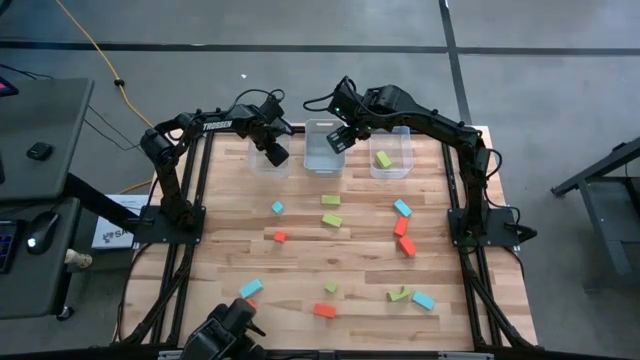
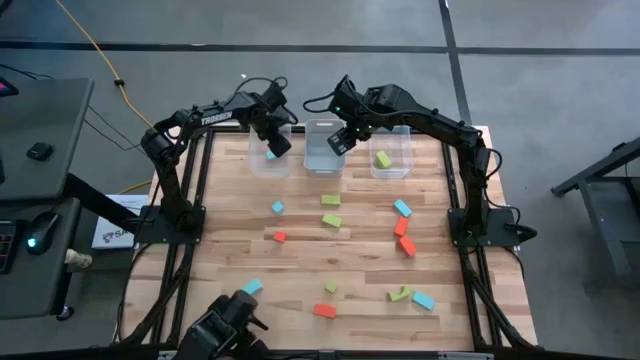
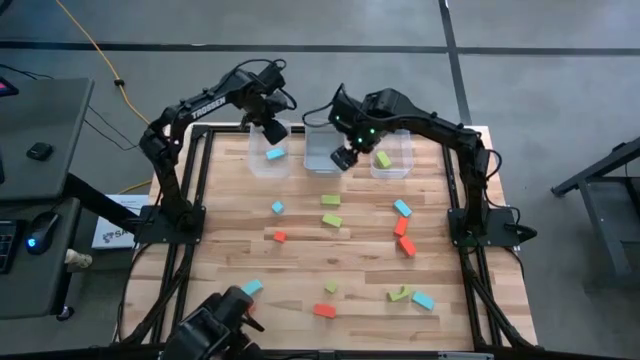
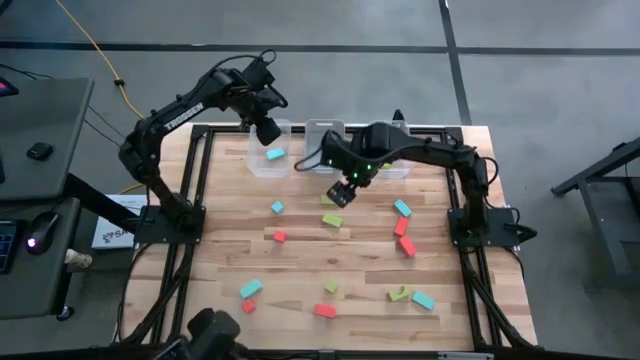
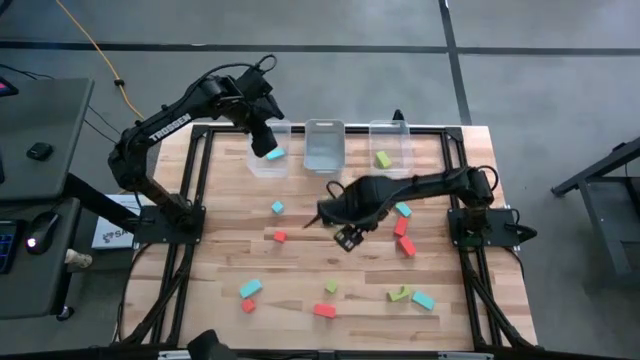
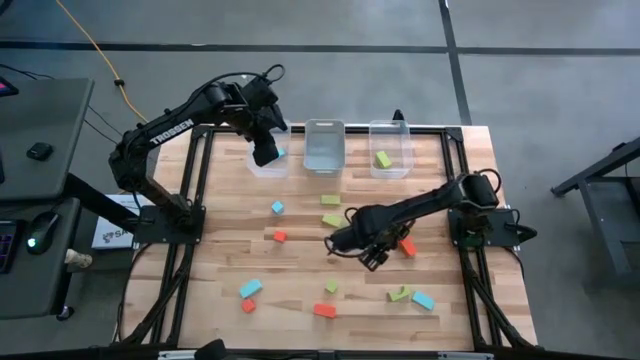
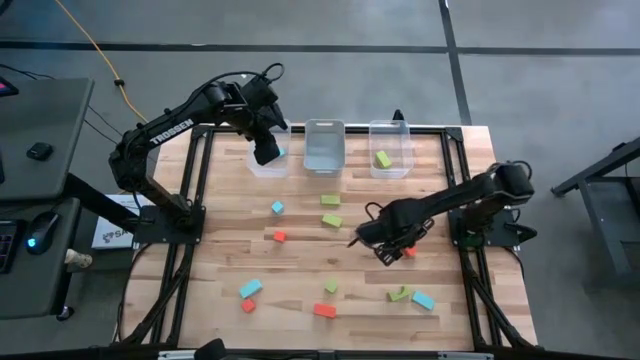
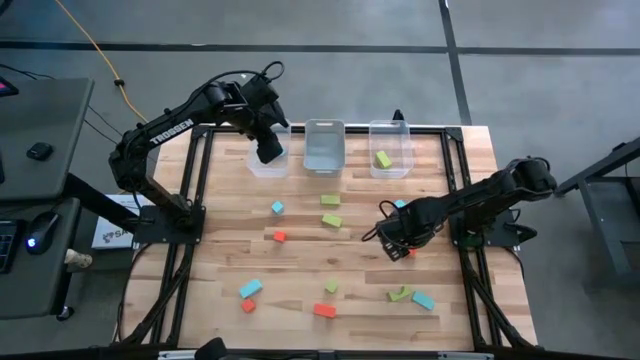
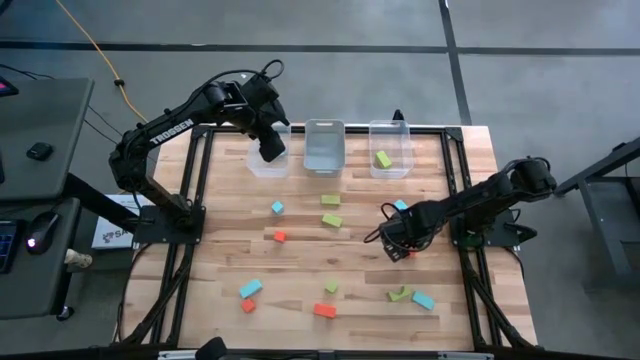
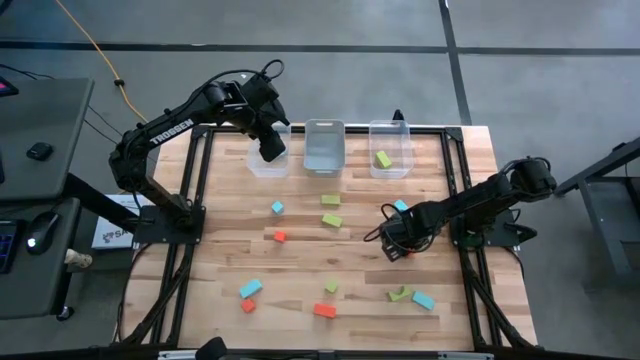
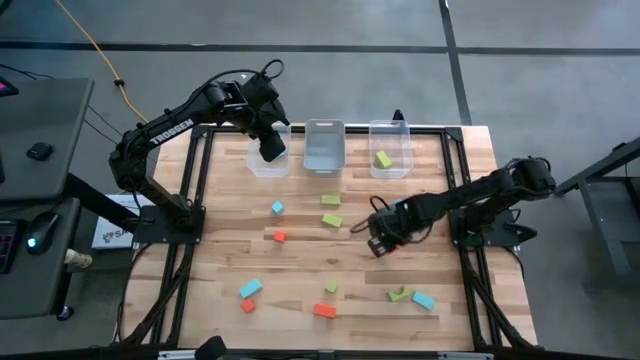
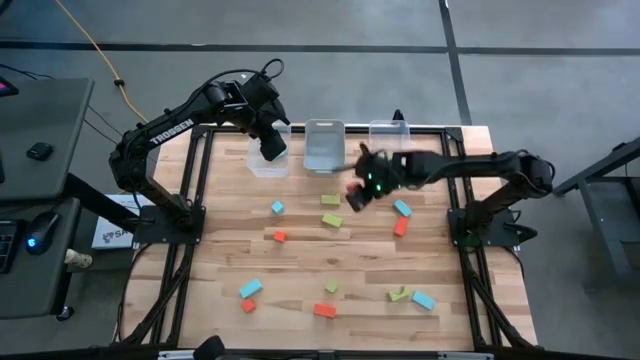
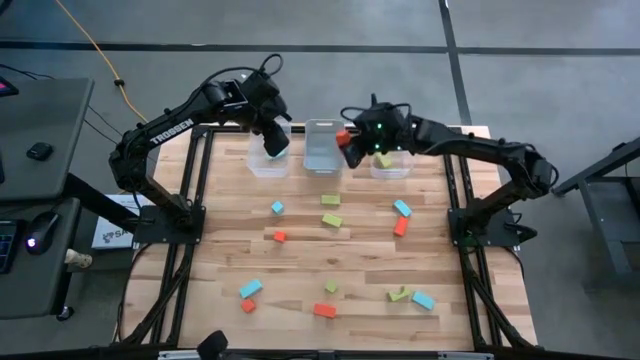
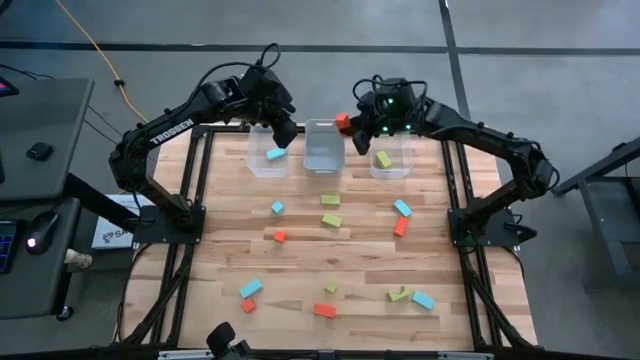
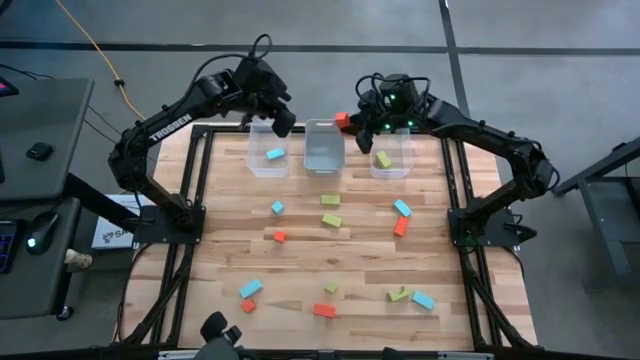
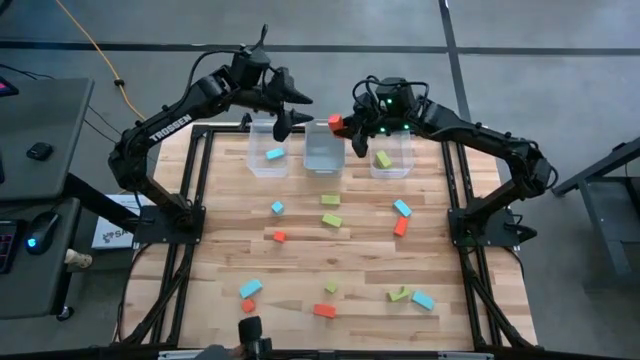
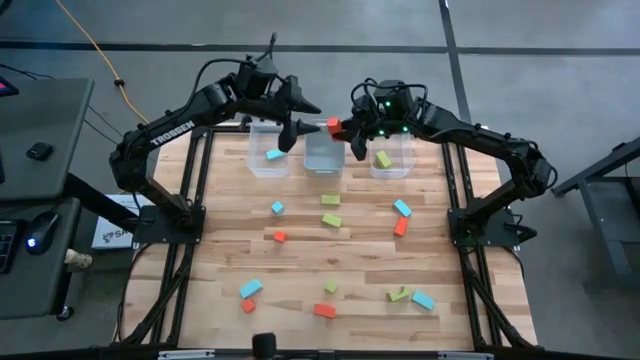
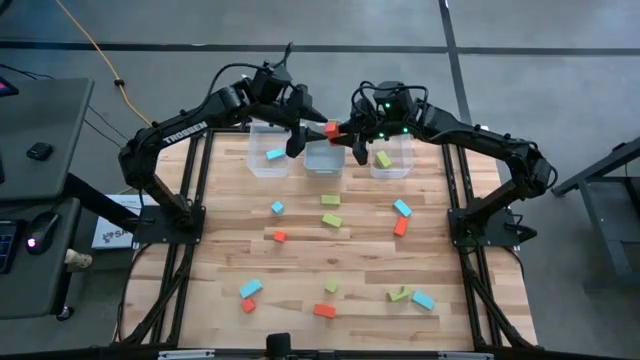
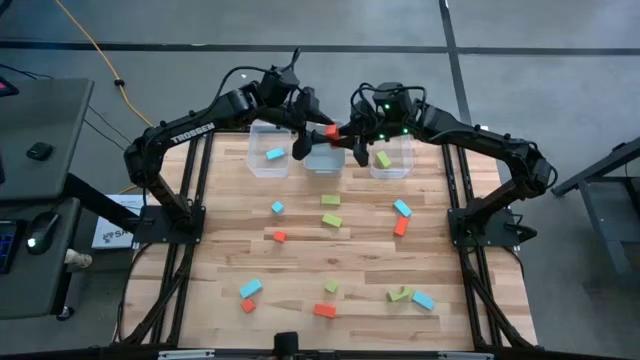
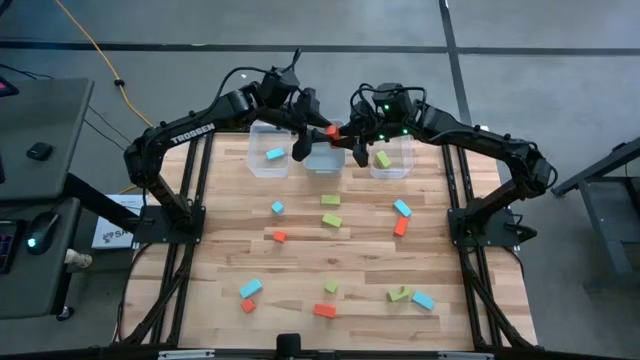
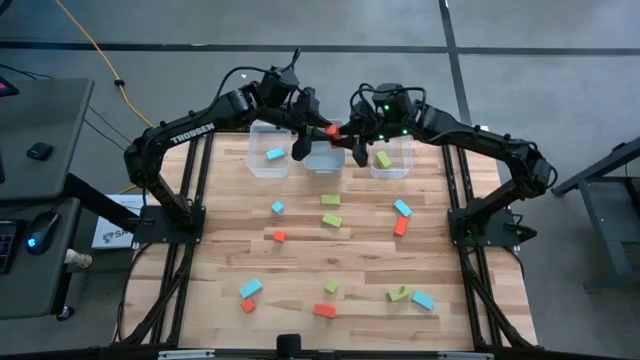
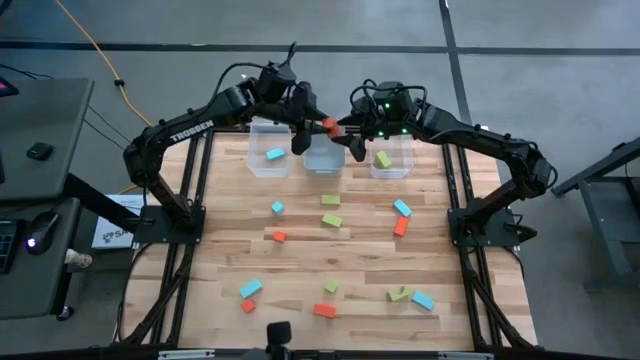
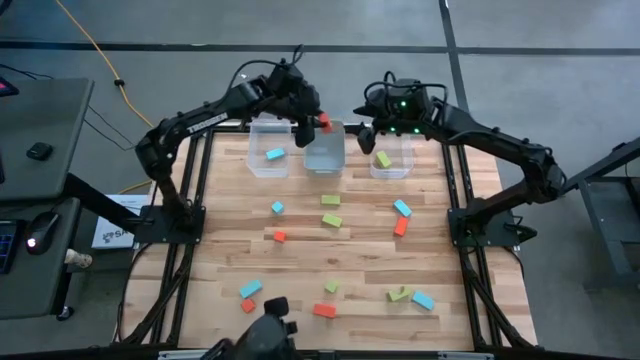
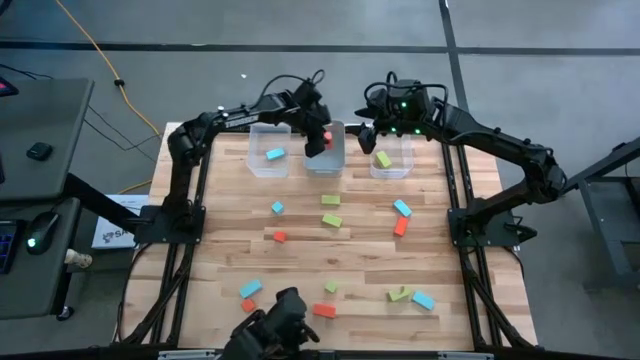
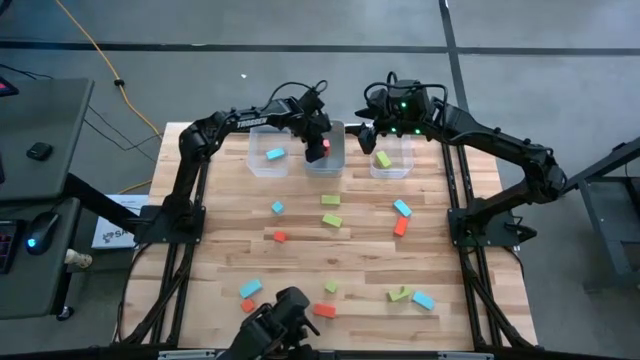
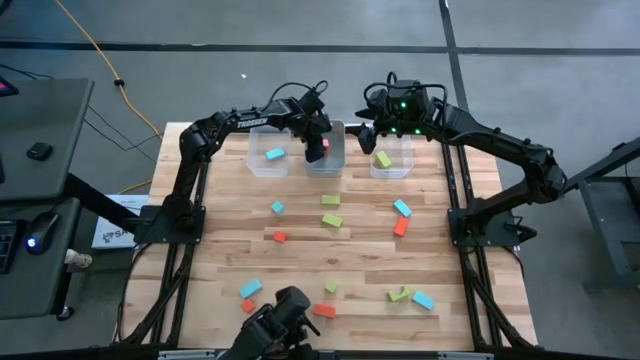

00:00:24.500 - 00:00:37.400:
Task: Sort & place blocks by color
Put the large orange rectangular block into the gray bin

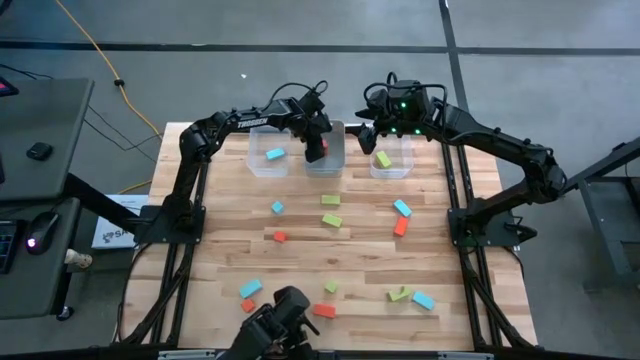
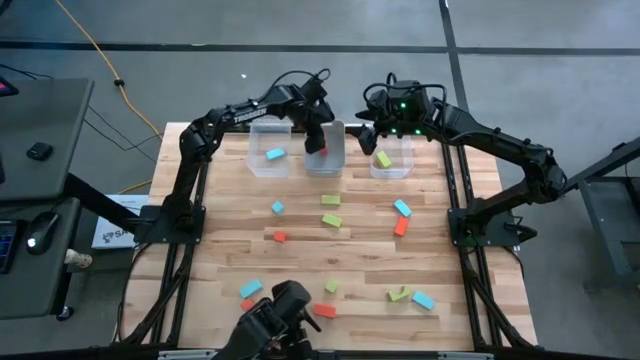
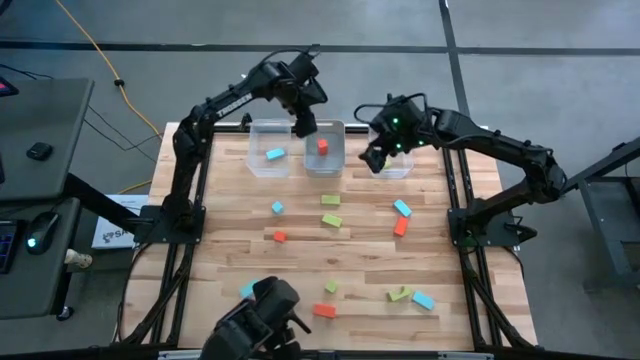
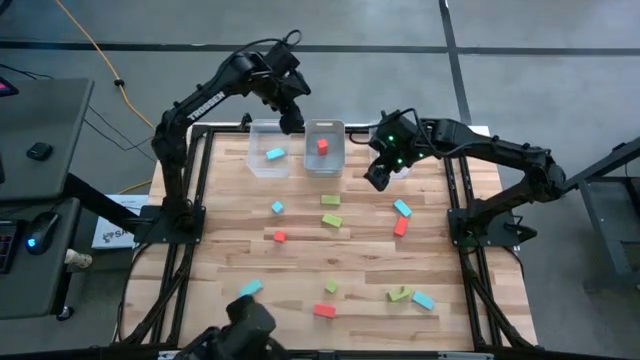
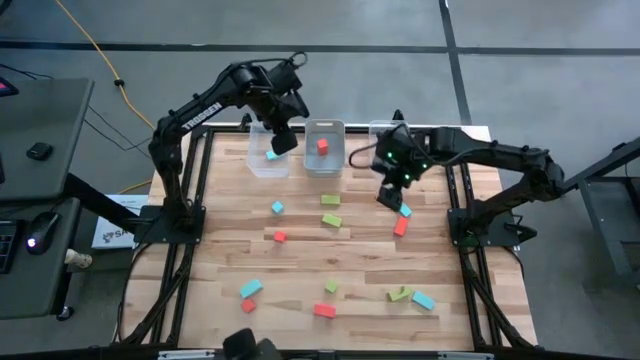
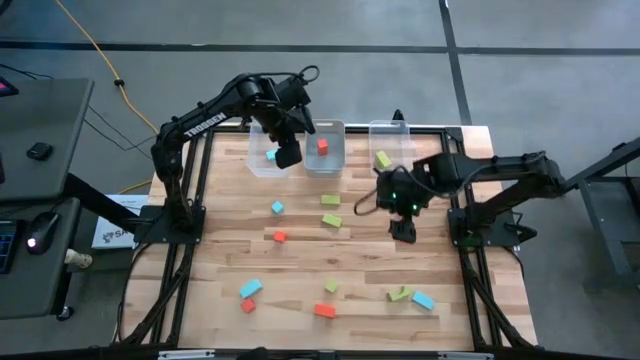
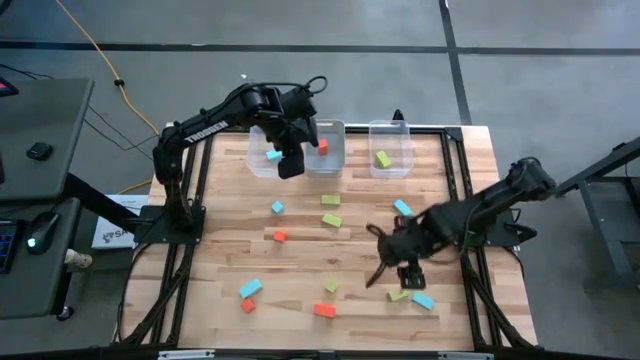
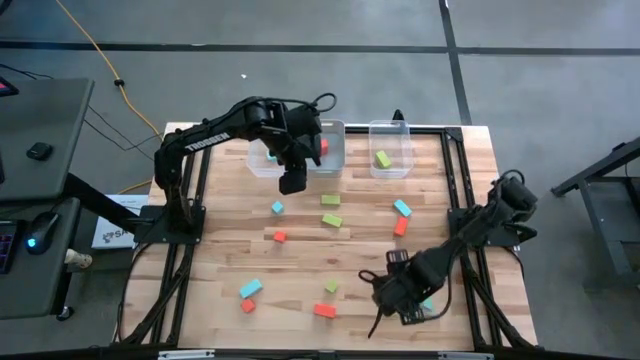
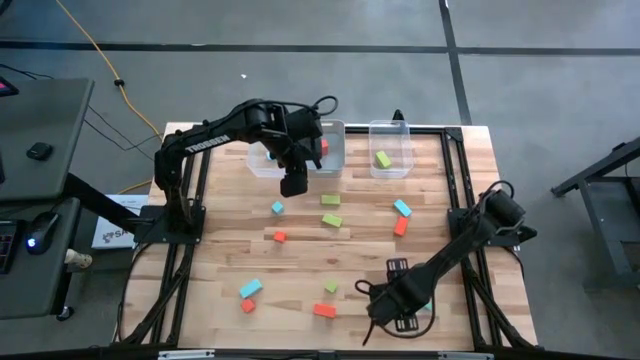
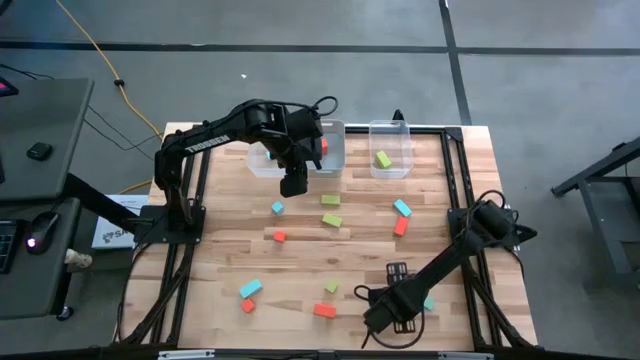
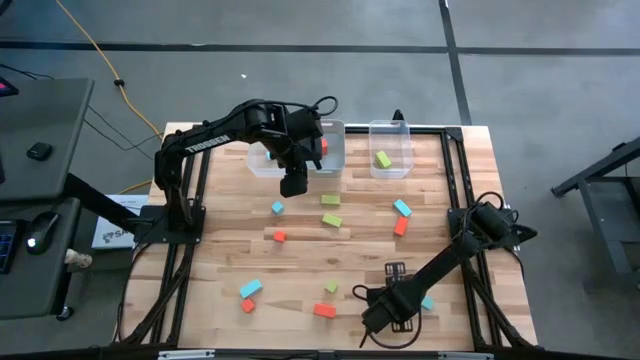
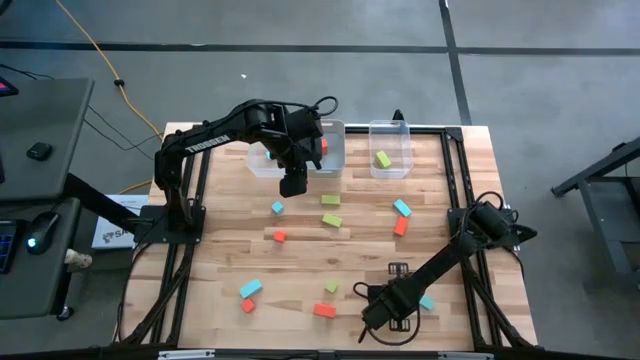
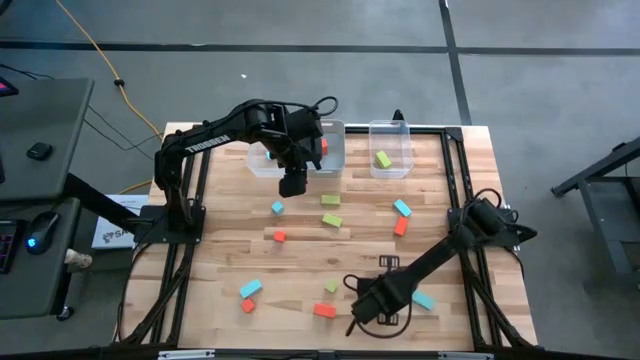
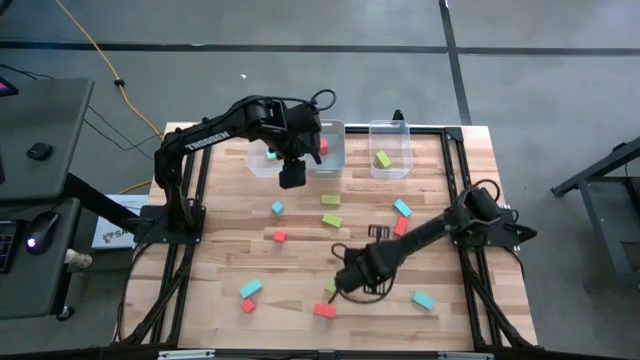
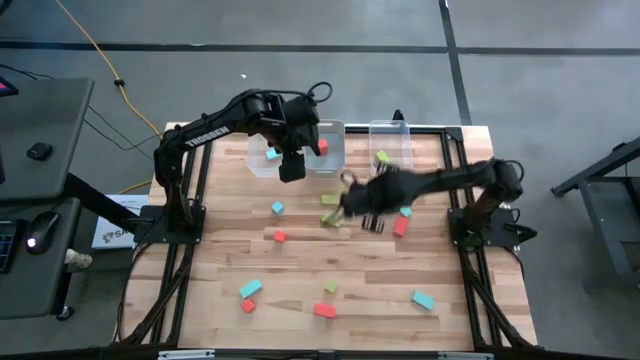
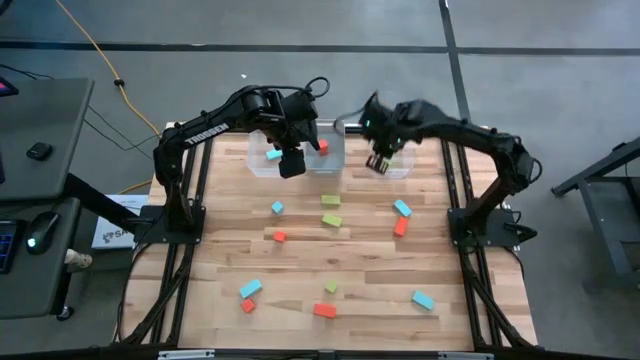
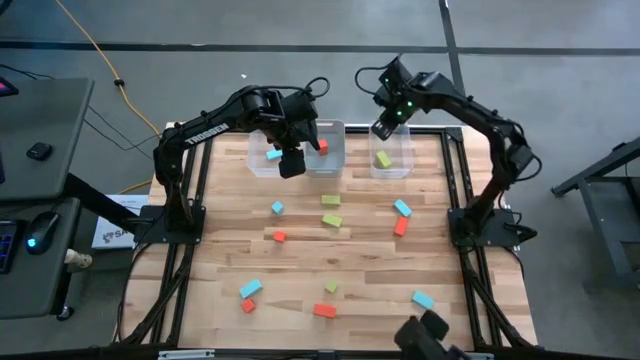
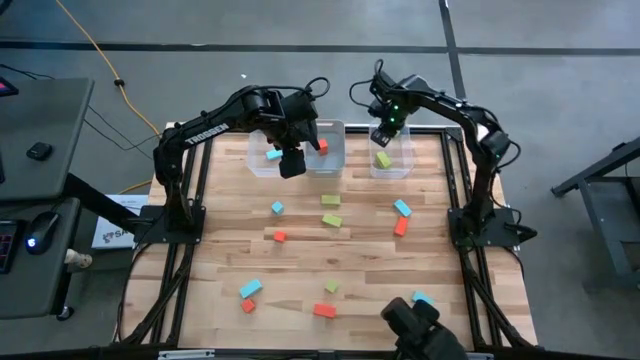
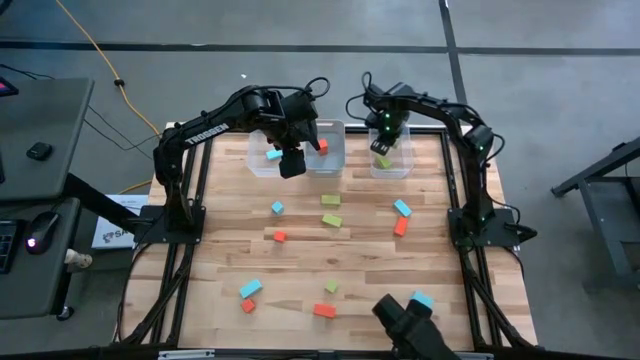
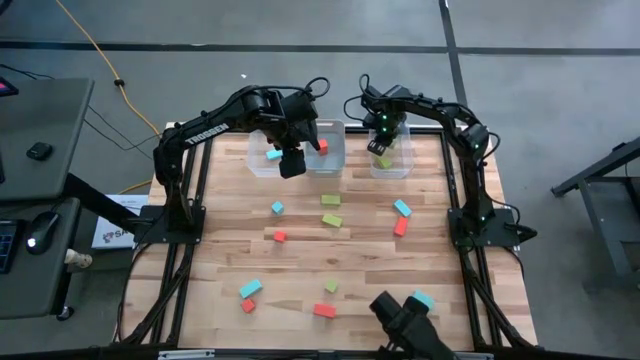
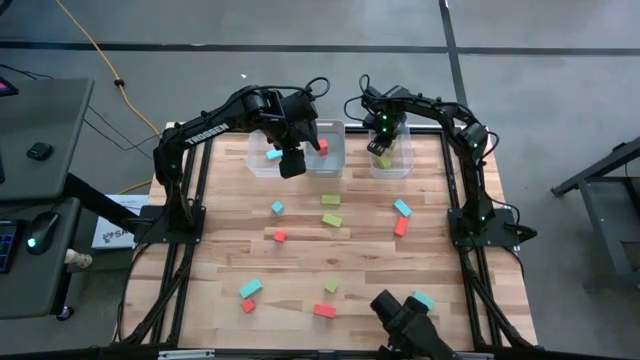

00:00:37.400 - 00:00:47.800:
Put the green arch block into the right transparent bin
